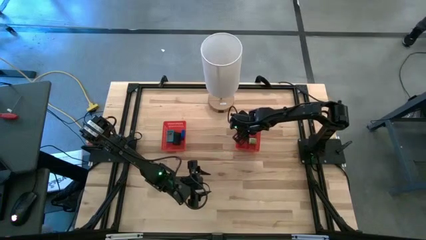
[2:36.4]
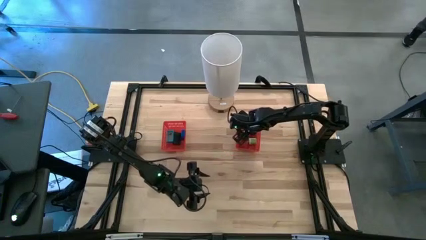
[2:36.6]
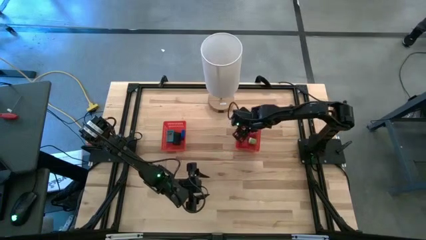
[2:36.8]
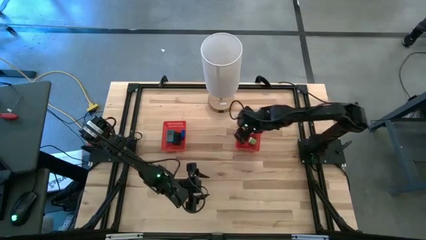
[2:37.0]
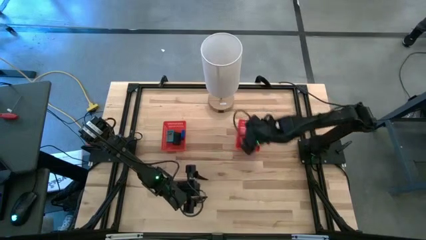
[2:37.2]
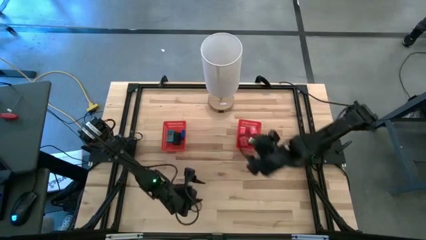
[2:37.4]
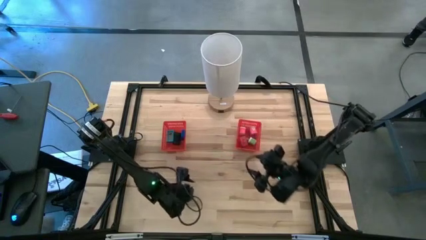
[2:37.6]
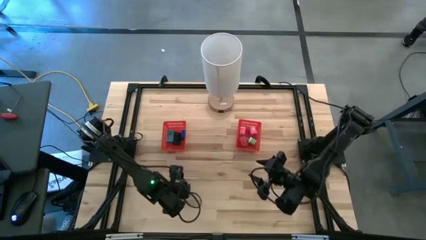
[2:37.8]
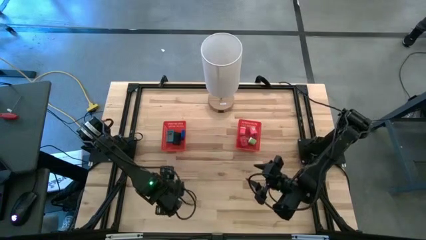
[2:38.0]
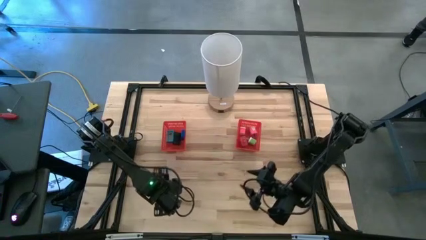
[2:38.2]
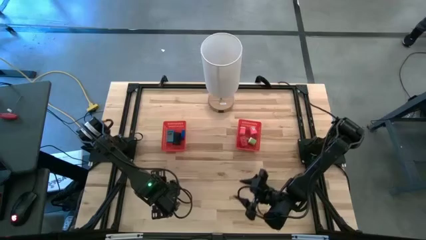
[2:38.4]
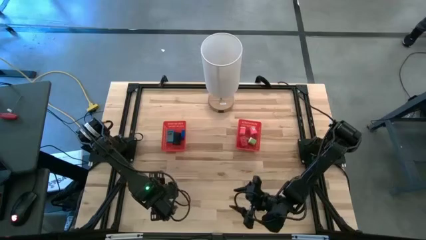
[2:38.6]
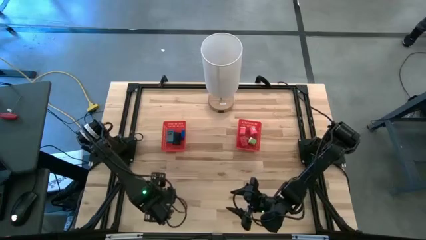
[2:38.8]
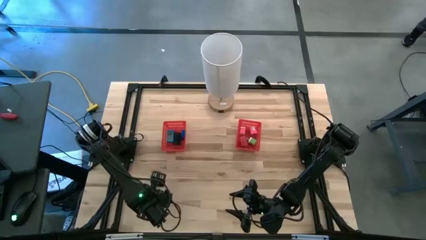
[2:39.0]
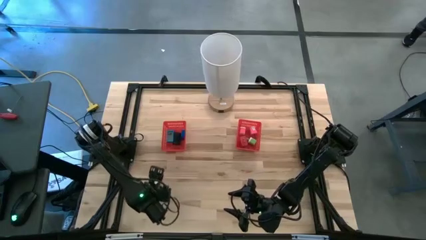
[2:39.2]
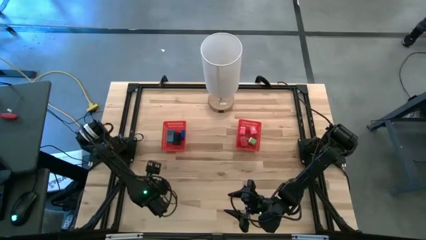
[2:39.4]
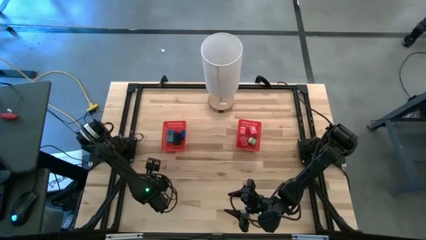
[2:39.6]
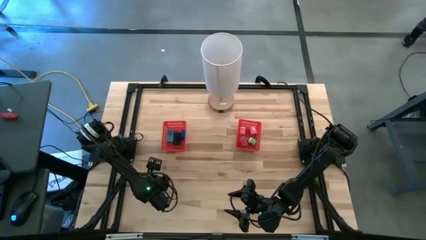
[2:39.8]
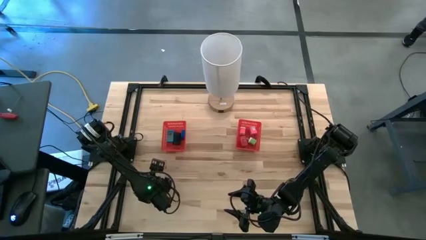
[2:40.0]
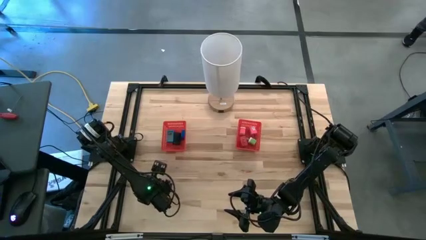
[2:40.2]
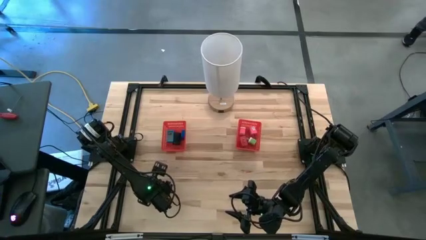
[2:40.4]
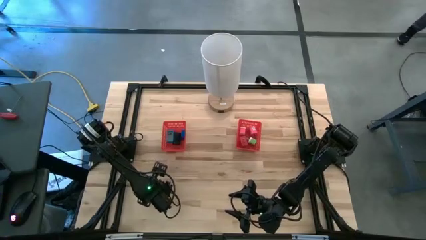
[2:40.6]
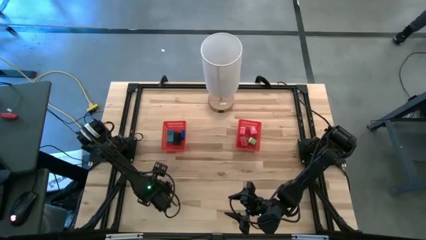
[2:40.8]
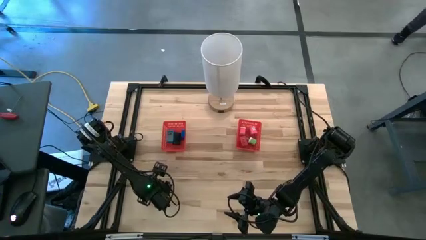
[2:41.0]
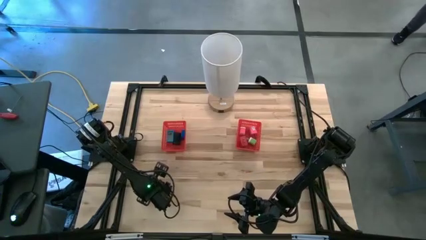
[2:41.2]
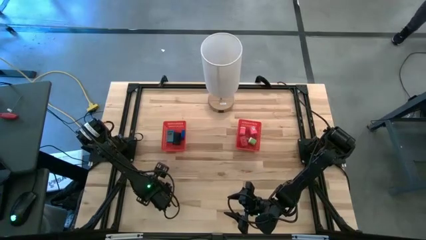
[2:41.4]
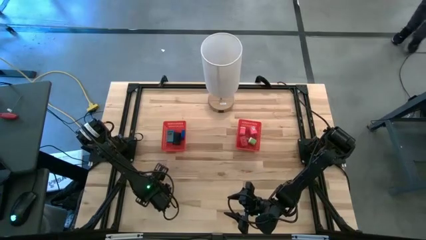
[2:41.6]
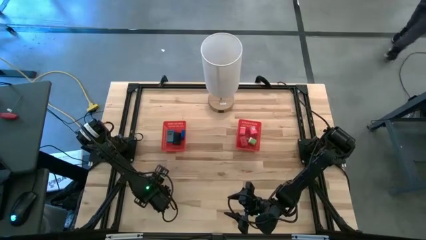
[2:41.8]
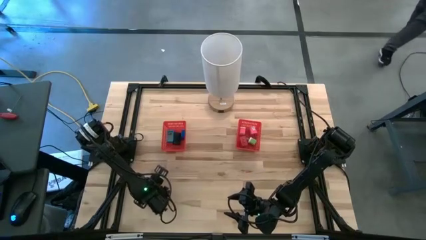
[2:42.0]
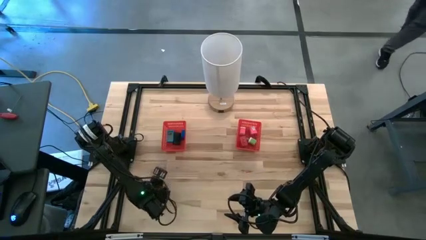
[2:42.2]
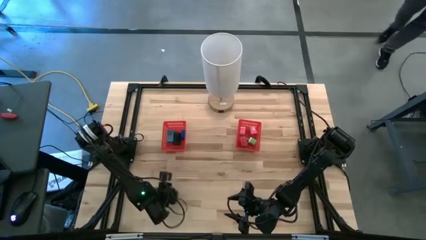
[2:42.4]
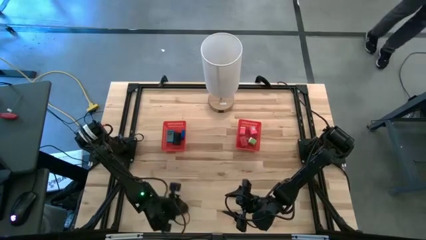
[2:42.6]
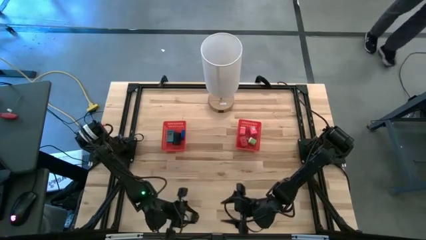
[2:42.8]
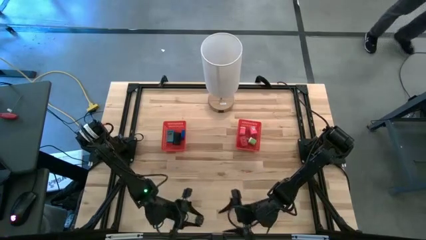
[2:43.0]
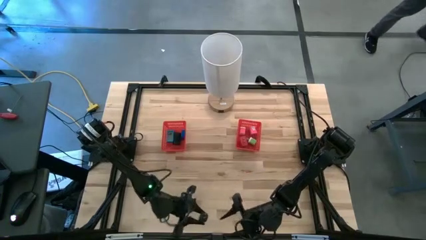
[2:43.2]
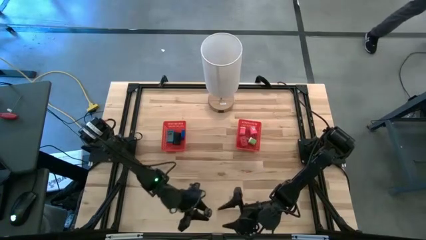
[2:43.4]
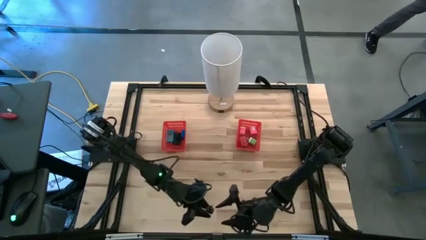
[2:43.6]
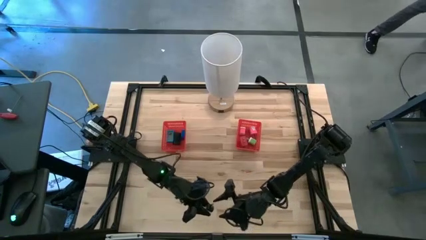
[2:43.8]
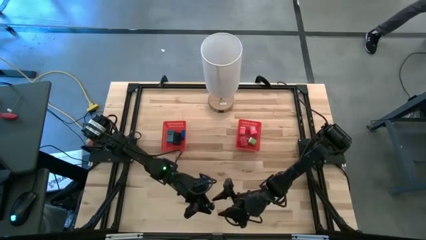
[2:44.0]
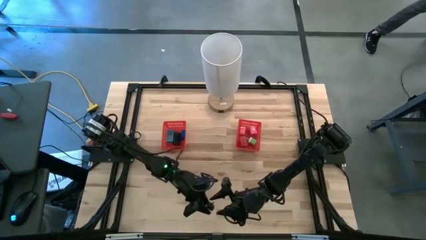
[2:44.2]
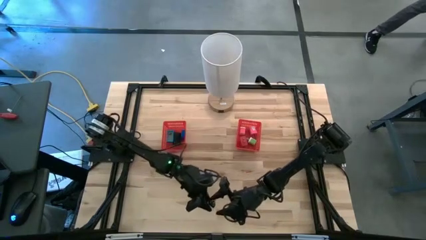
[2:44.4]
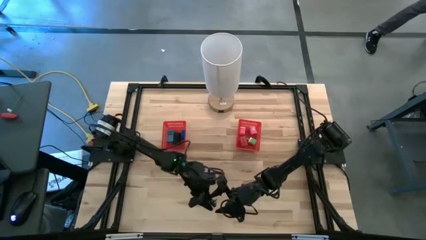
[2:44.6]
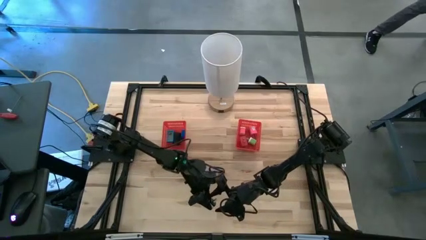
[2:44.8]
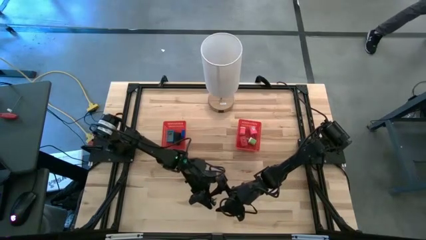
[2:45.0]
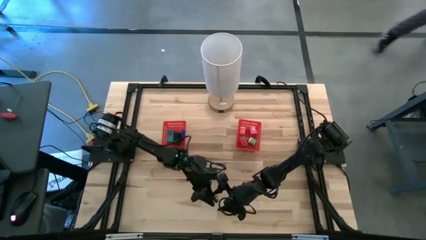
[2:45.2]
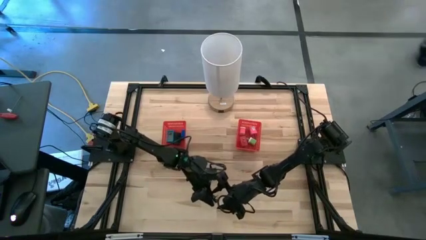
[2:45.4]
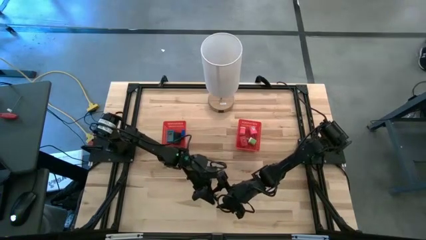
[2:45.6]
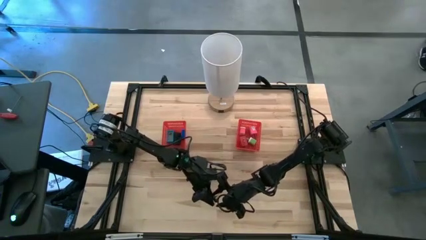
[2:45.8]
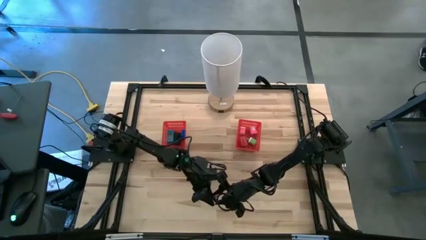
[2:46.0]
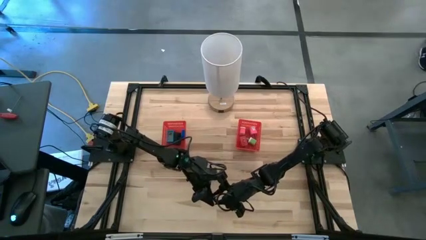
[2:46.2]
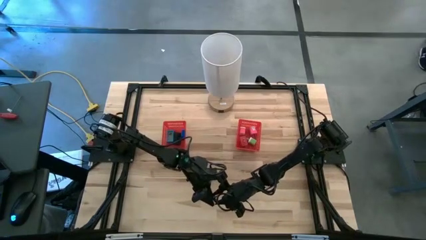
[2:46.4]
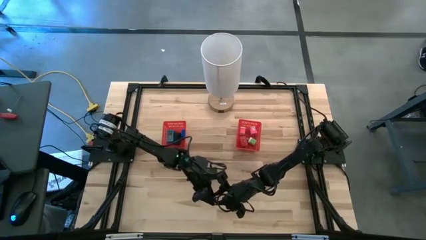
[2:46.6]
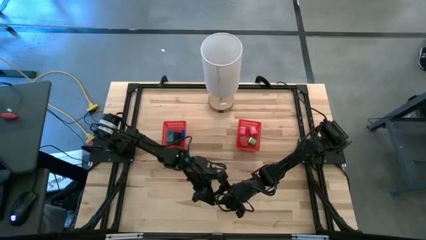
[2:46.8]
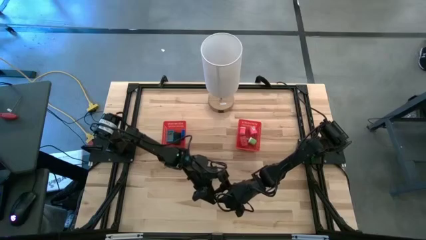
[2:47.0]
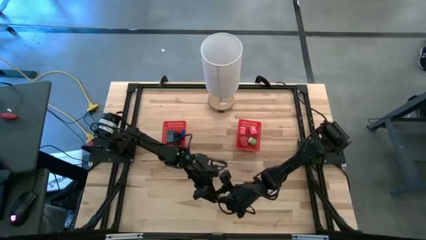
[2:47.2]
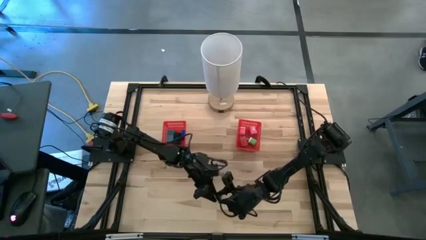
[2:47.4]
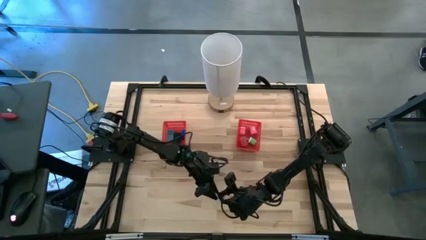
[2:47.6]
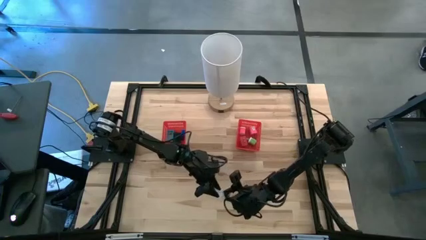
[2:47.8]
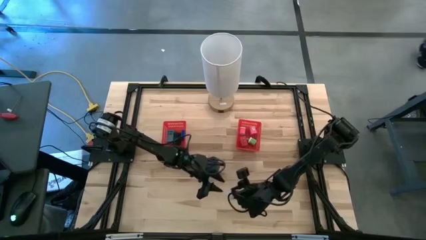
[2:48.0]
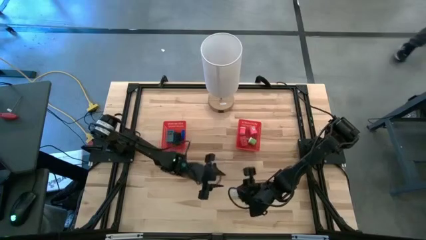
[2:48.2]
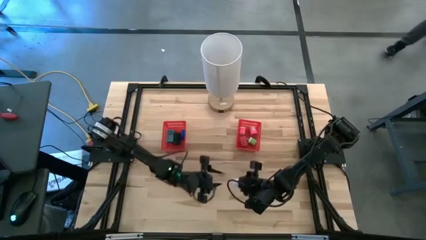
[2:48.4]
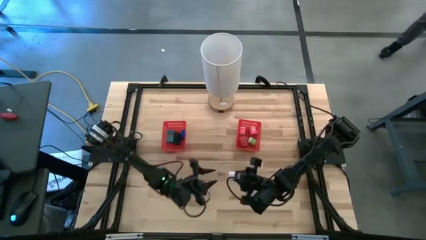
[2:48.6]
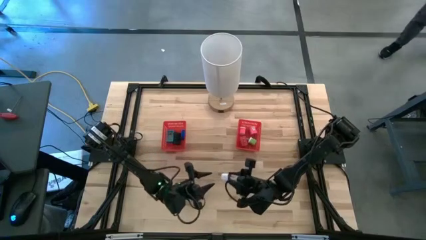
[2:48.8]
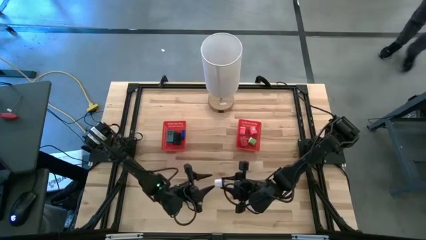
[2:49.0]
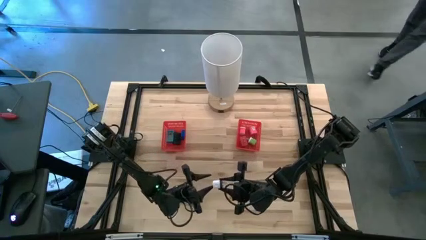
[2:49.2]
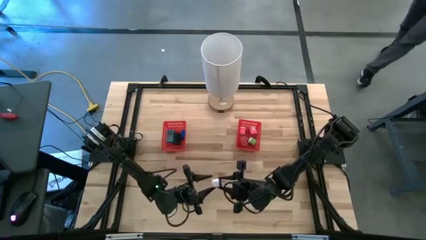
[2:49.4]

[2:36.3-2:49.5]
Task: Pick & Place Office items
Put the white charger adapter into the right red bin

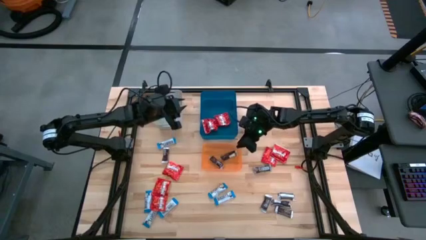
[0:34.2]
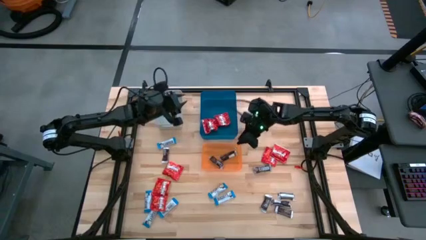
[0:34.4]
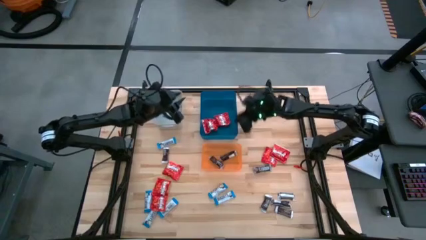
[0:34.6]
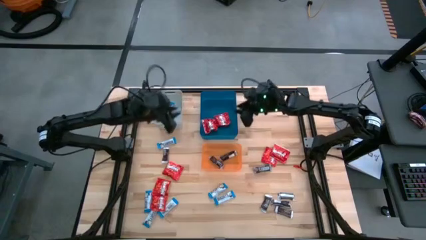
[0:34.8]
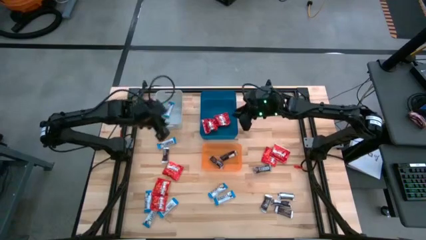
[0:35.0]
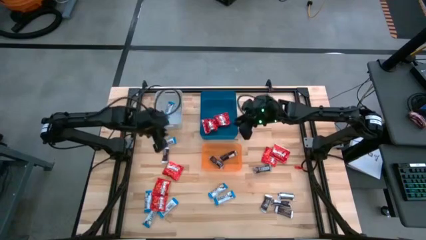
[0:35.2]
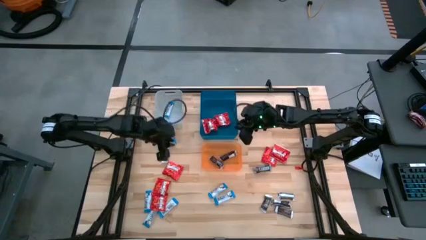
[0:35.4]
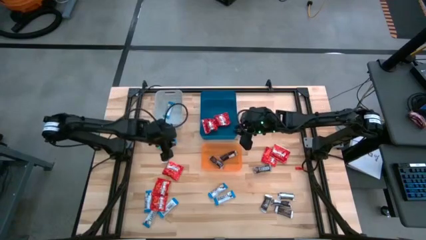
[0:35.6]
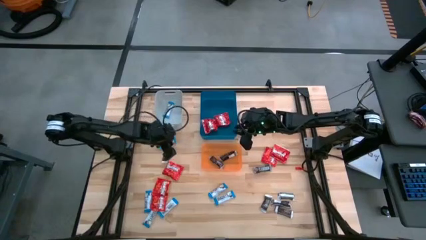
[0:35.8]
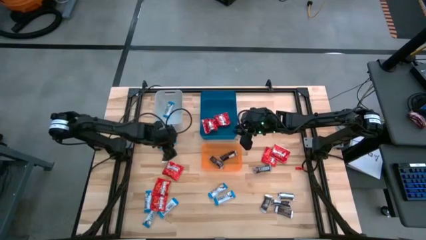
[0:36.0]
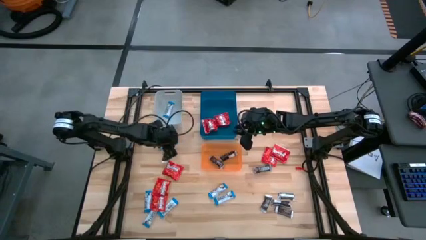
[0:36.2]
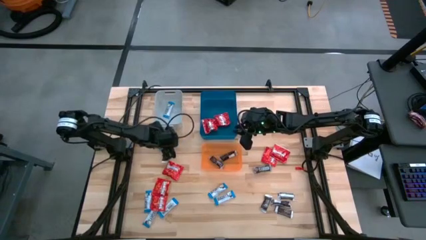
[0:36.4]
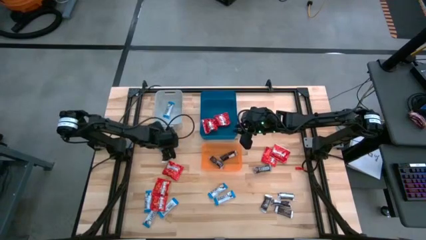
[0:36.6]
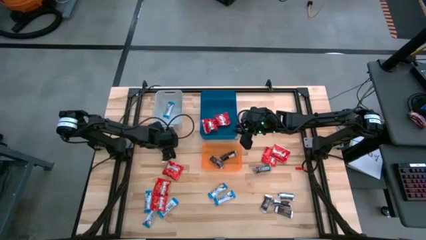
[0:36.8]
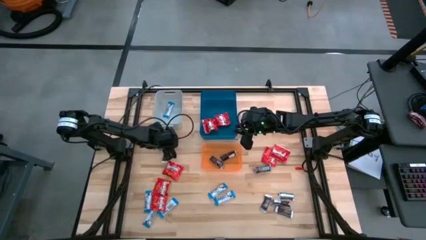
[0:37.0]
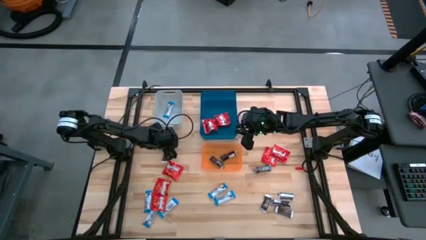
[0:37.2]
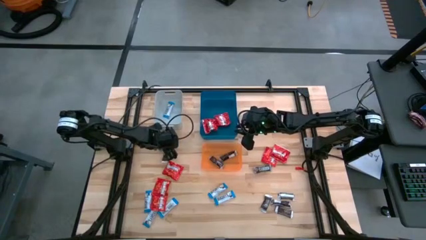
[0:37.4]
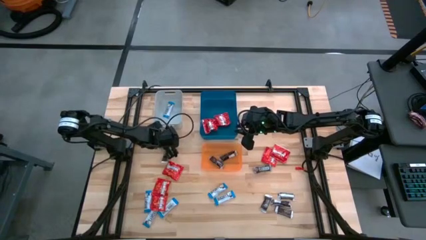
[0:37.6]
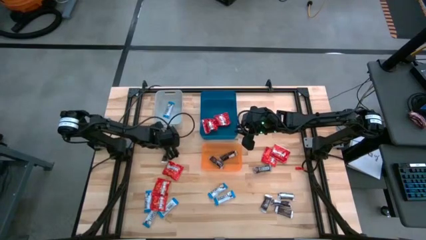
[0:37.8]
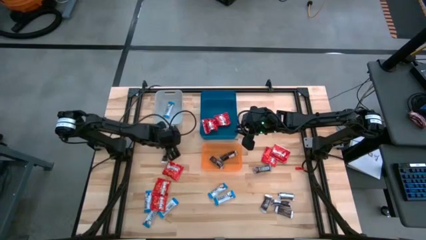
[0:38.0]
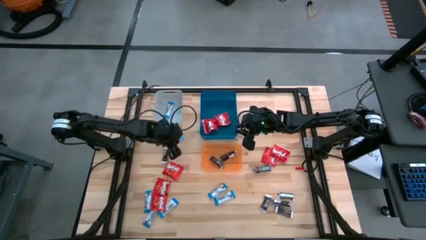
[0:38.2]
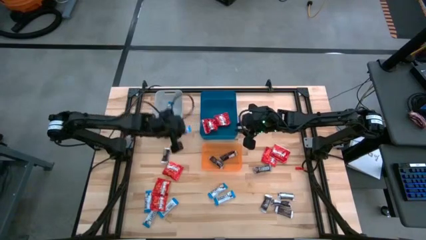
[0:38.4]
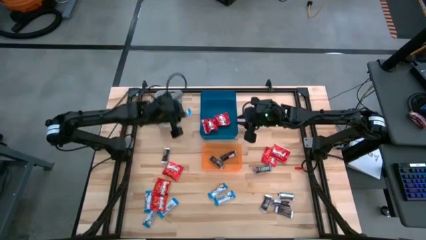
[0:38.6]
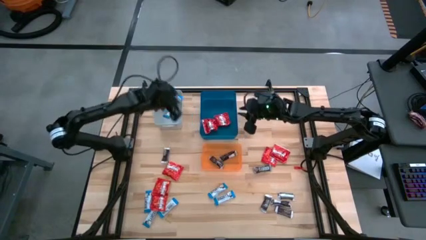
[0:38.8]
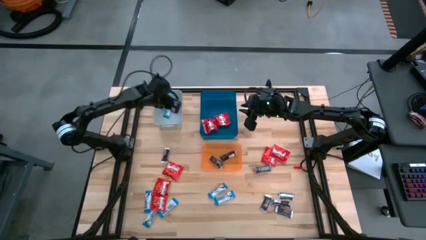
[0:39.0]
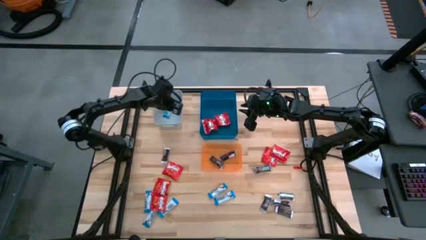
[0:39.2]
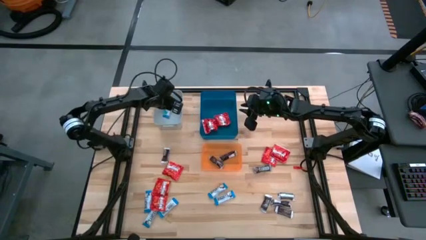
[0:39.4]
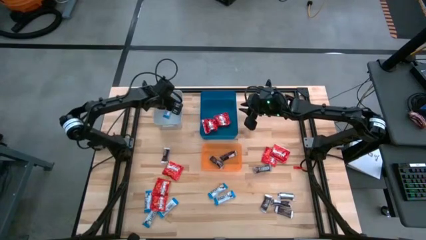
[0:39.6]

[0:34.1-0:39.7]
Task: Sort candy
Put the blue chocolate bar into the gray bin
